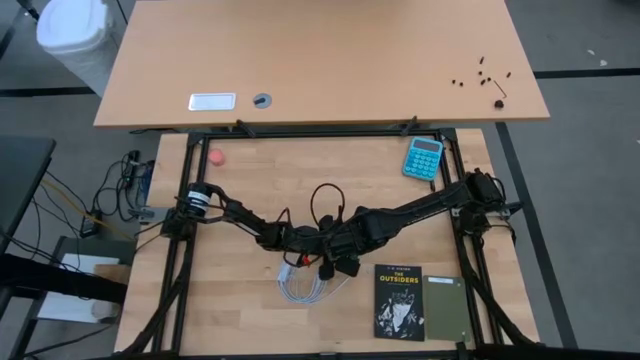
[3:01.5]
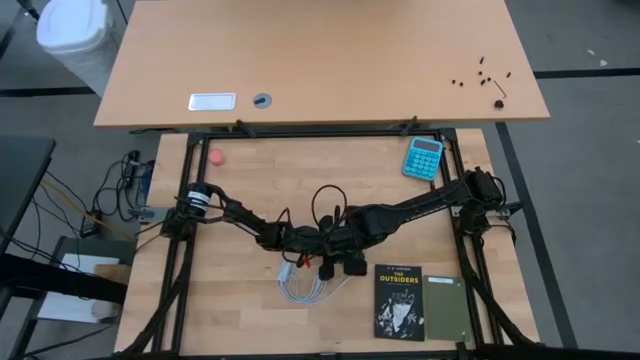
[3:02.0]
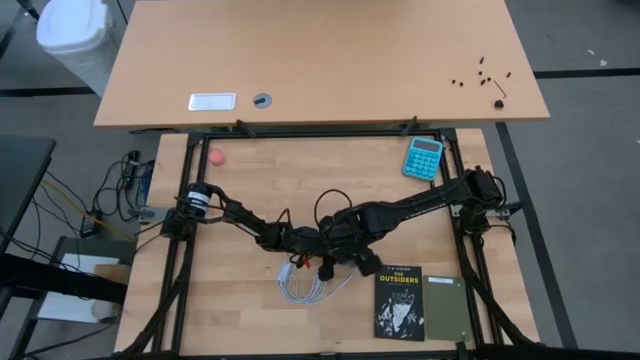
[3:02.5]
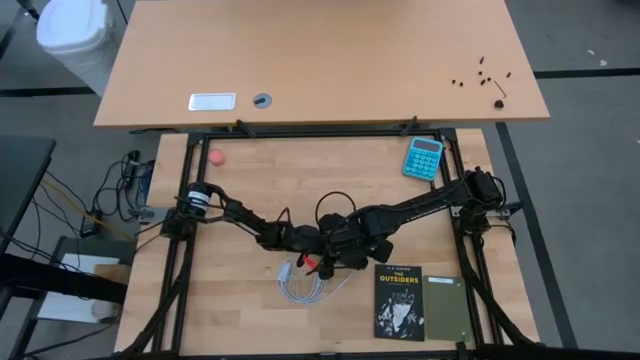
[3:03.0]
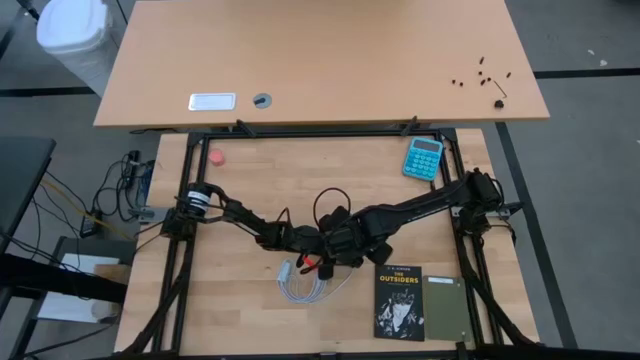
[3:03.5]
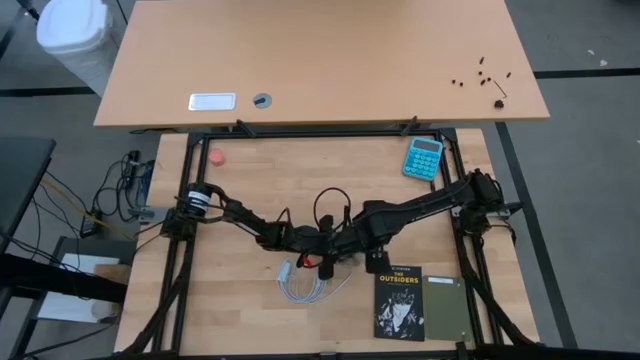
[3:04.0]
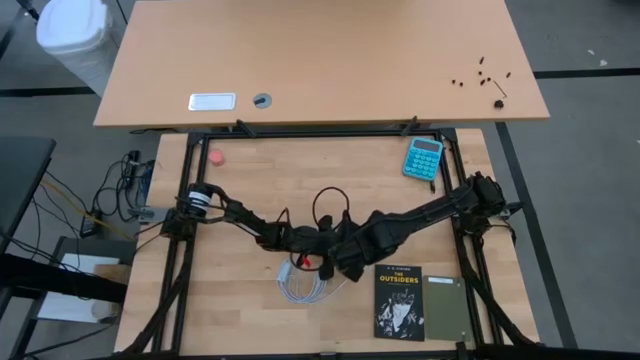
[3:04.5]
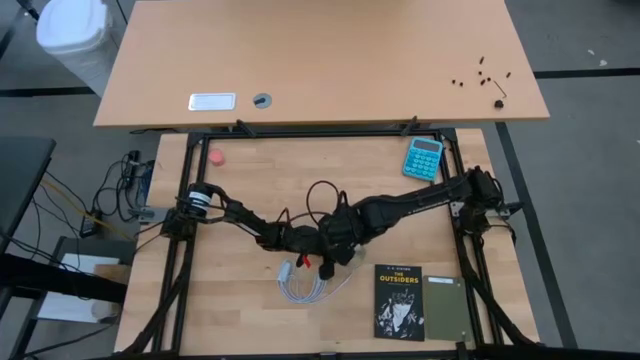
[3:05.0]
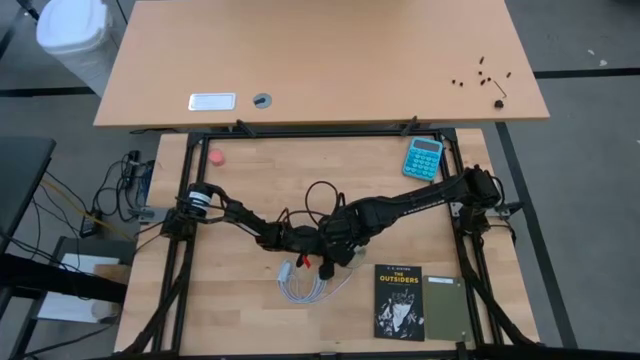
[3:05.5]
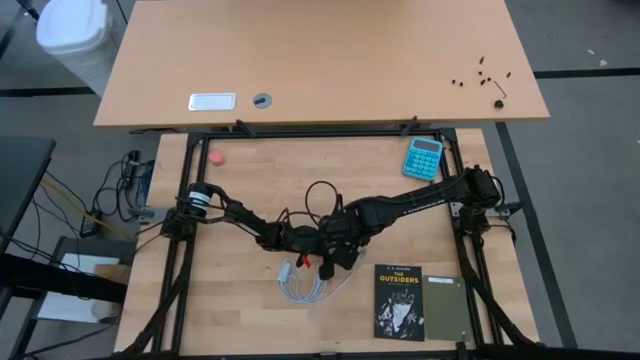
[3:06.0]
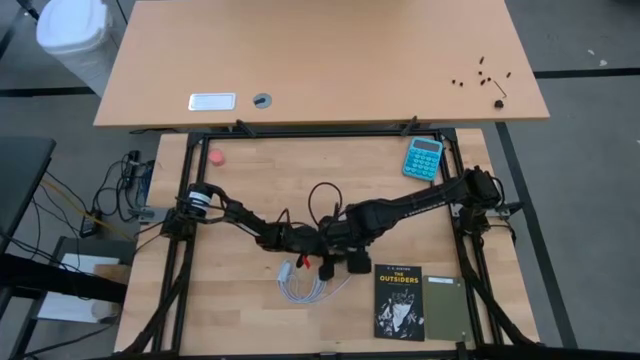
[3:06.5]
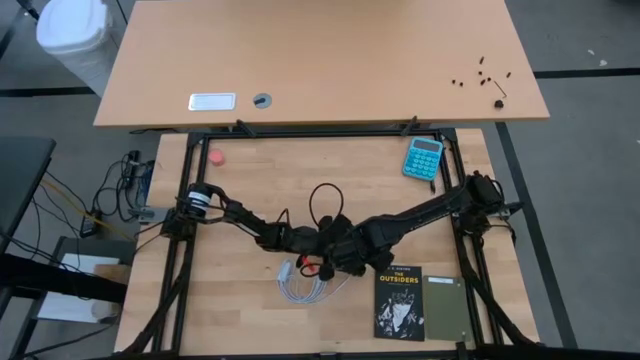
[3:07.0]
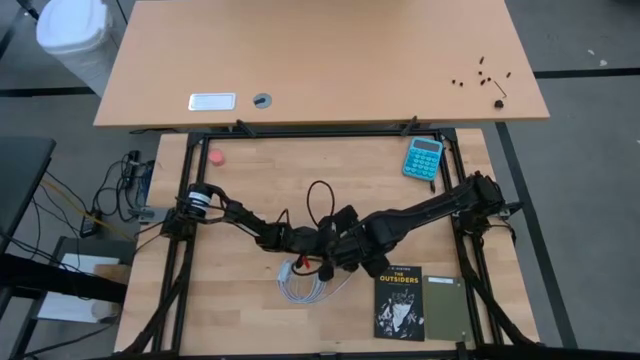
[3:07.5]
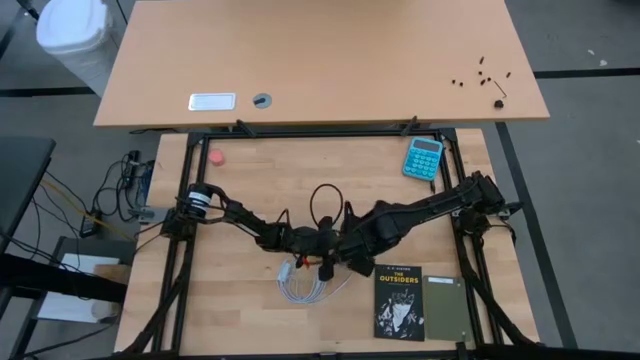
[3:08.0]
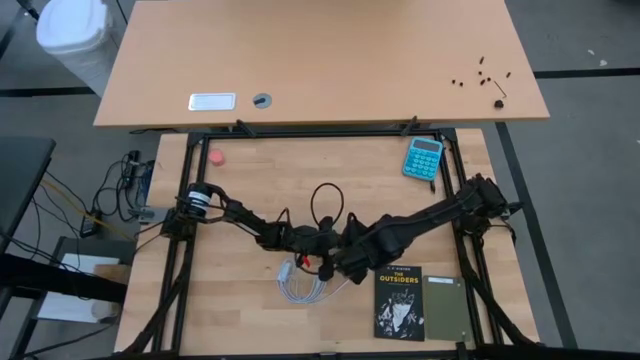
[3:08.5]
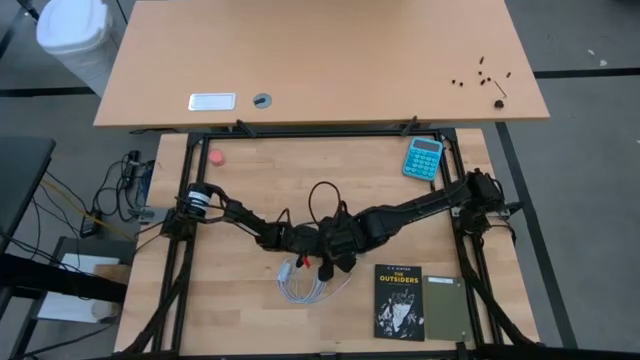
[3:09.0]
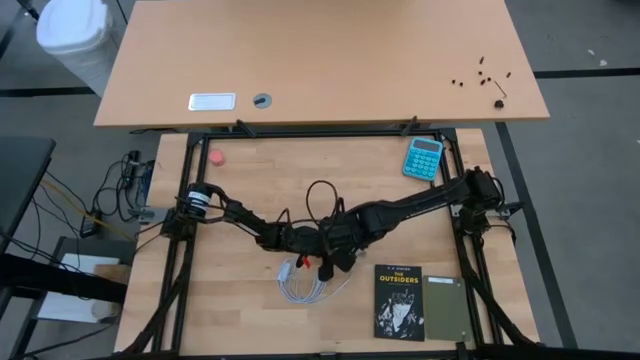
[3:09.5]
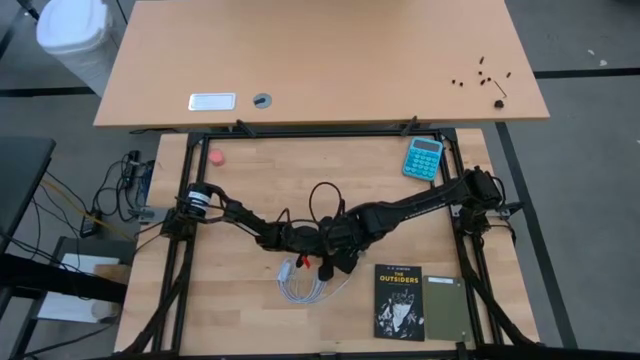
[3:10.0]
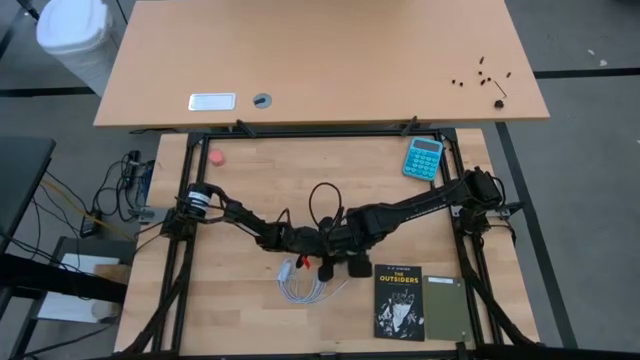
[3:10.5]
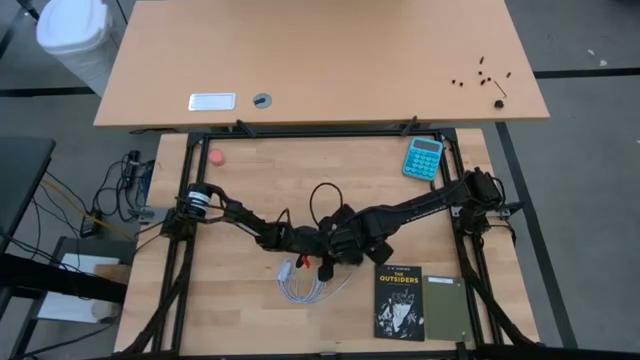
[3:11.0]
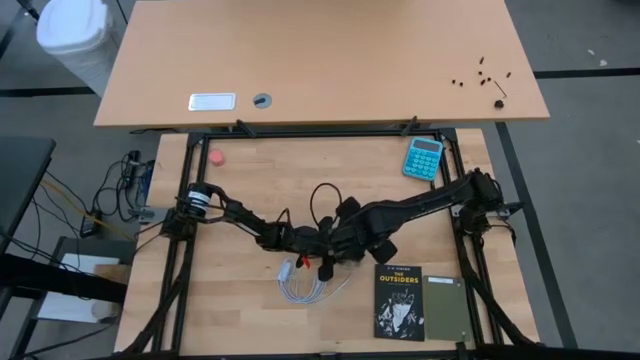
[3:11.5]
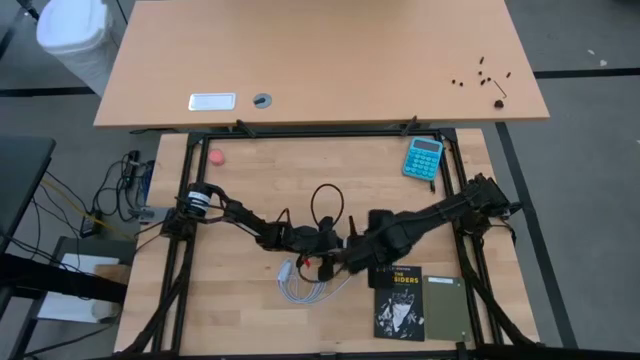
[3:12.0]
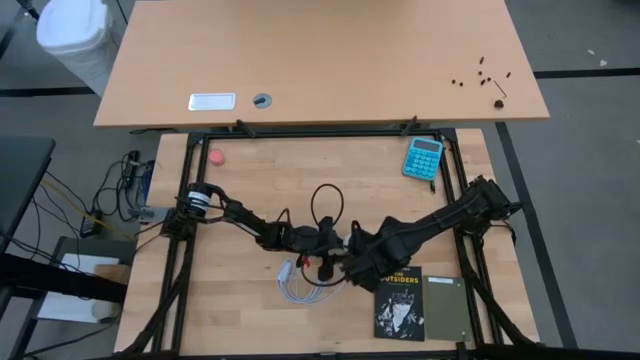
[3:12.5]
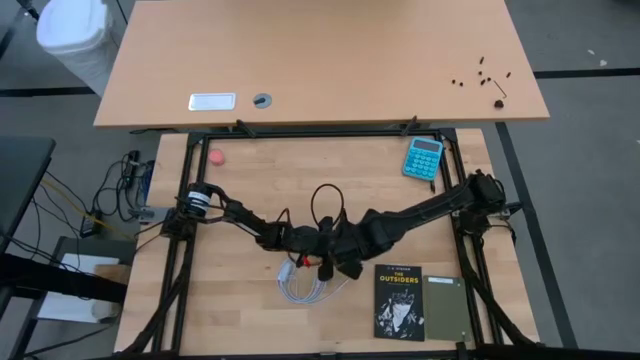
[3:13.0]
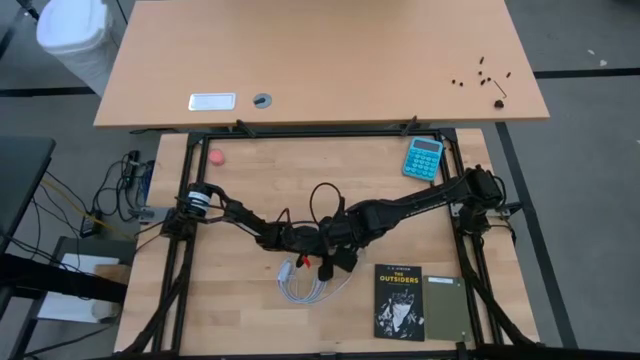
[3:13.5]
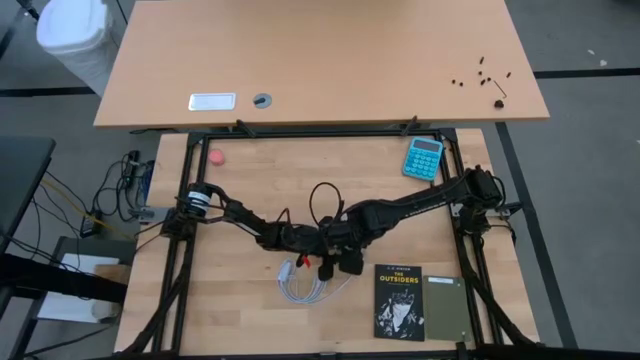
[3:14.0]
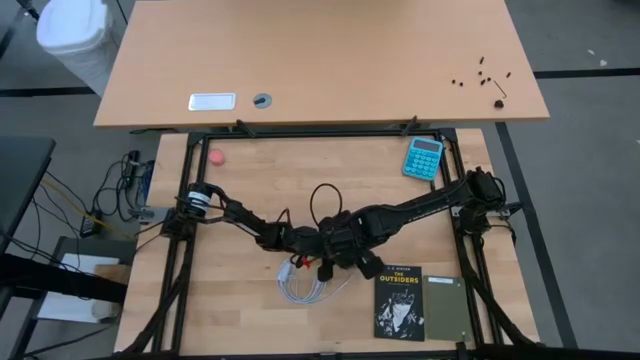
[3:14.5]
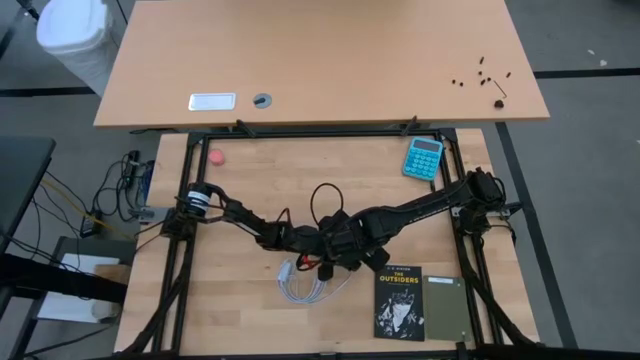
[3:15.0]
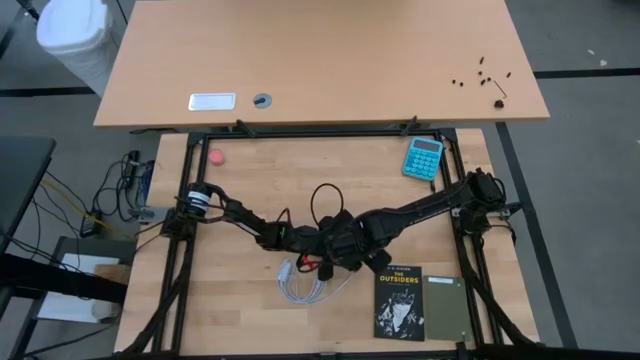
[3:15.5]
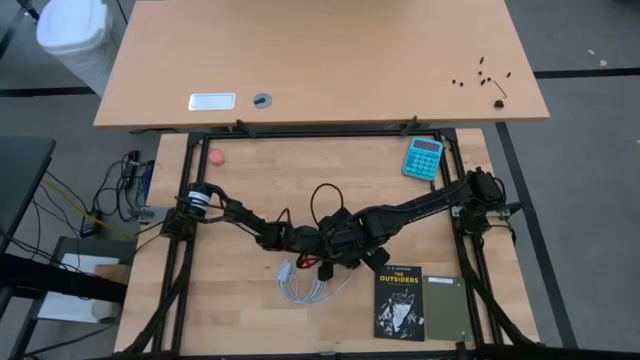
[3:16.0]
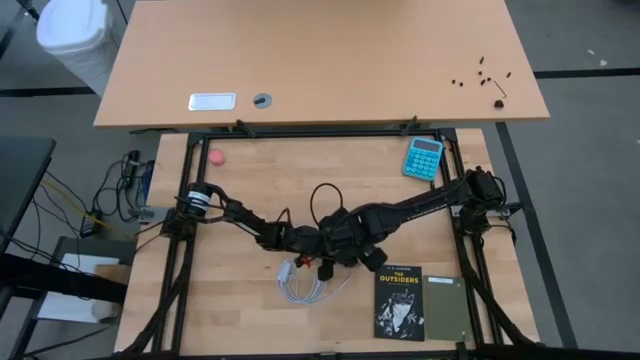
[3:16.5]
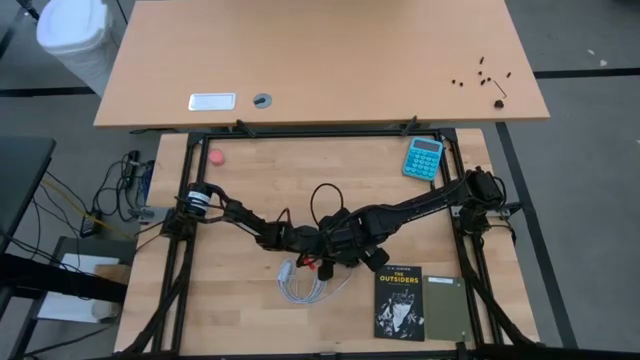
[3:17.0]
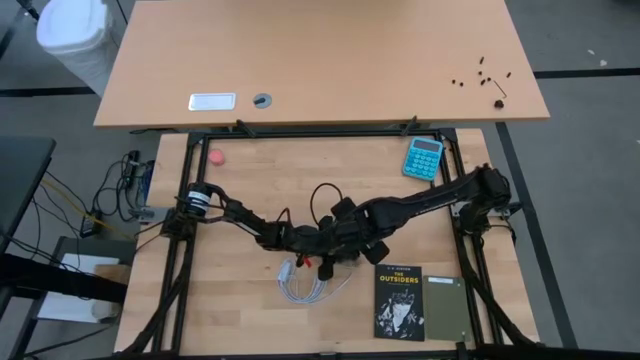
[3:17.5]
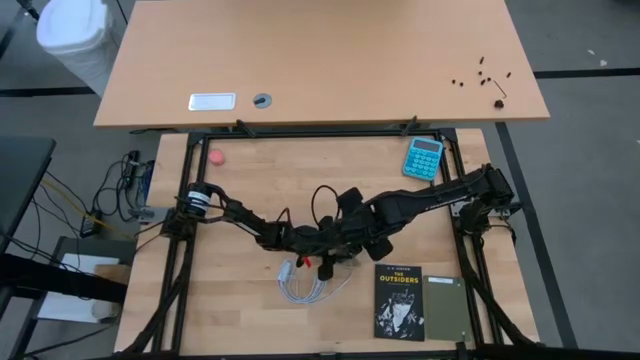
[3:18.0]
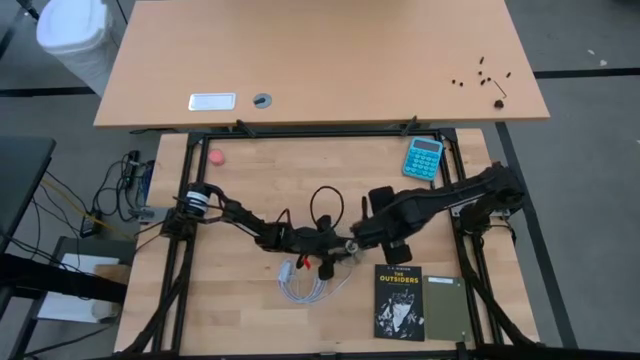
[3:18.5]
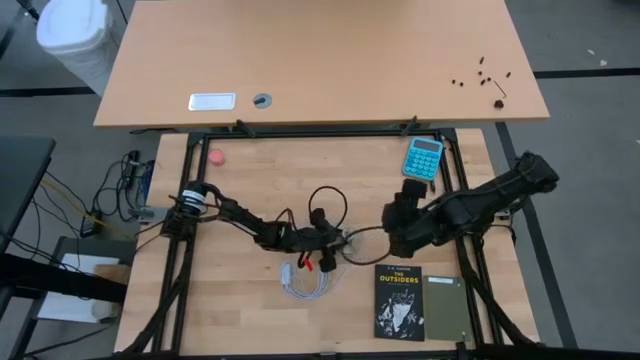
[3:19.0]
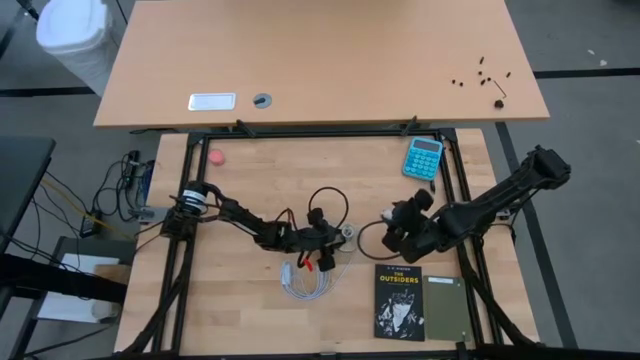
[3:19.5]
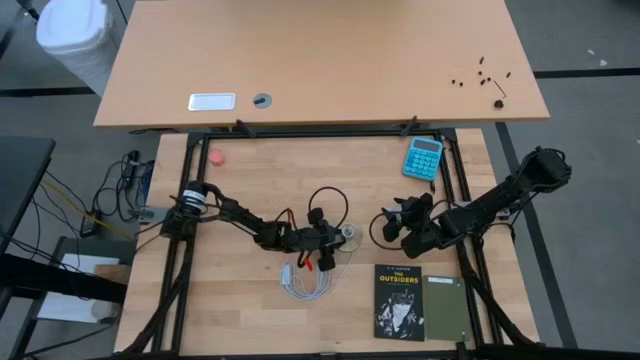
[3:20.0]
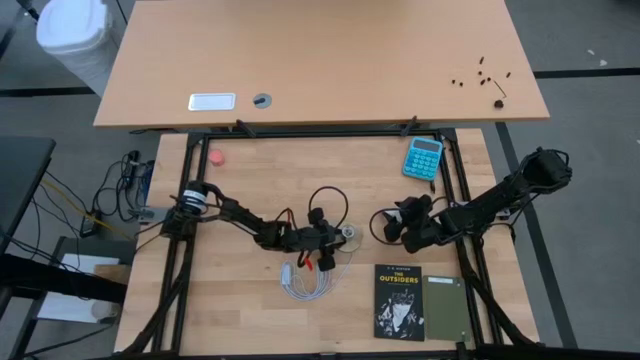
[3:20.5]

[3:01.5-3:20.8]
Task: Screw lightbulb
Remove the white lightbulb into the silver lamp

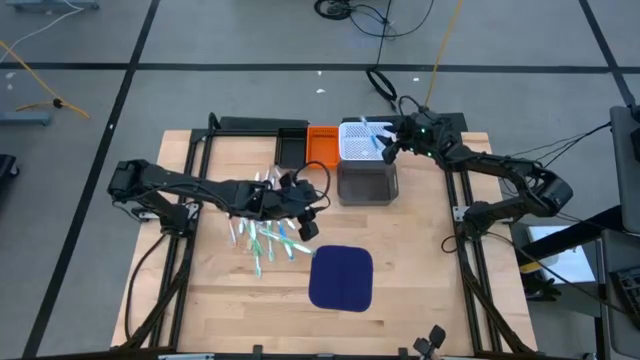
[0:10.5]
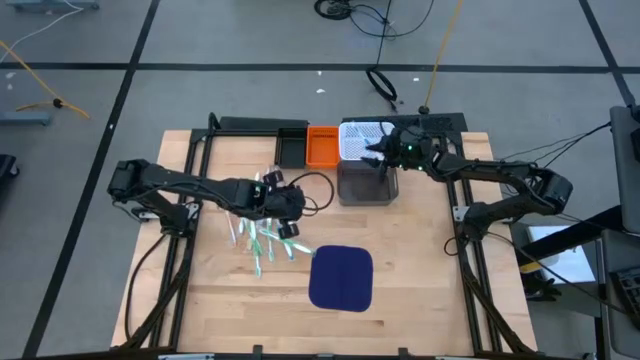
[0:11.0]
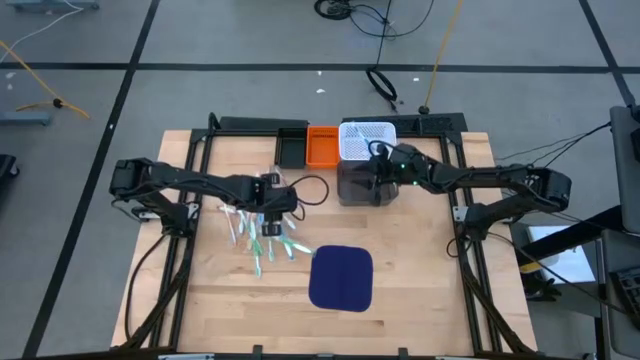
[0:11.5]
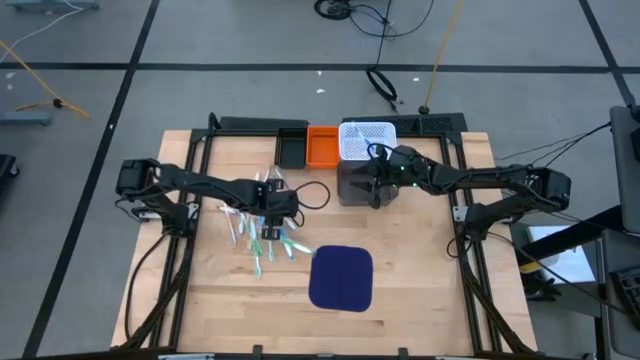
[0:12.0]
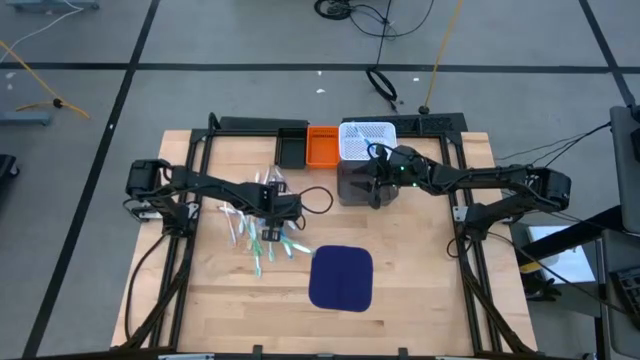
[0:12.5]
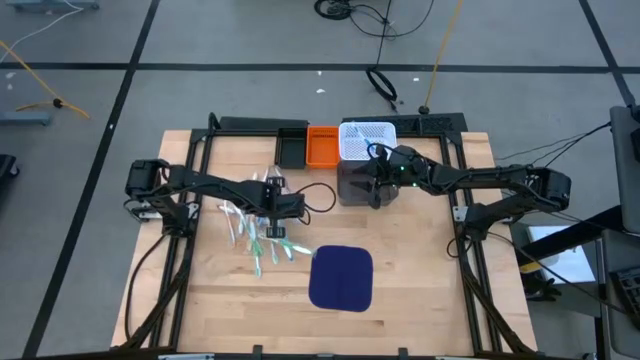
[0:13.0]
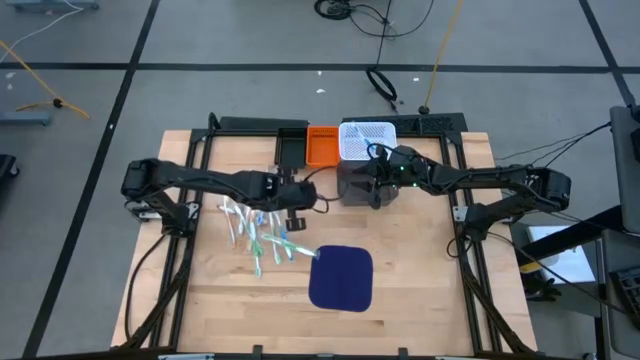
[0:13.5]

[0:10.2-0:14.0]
Task: Pick & Place Toothbrushes
Put the blue toothbrush into the white basket
